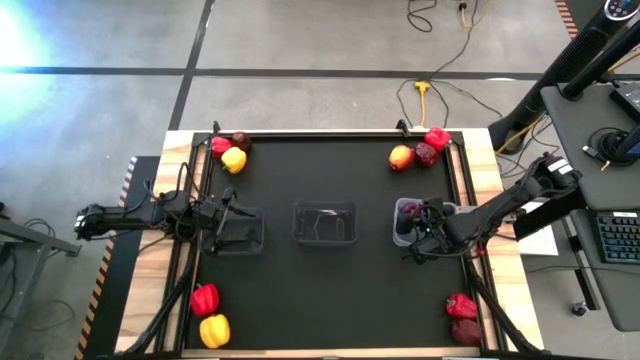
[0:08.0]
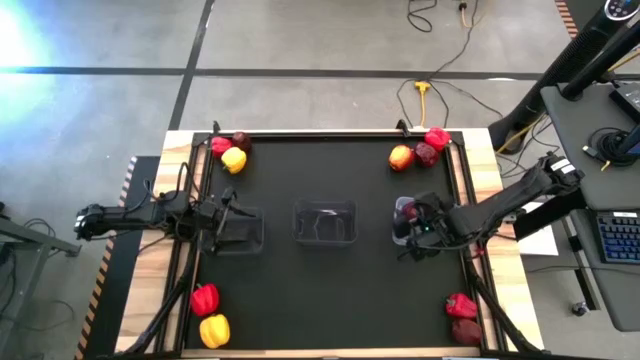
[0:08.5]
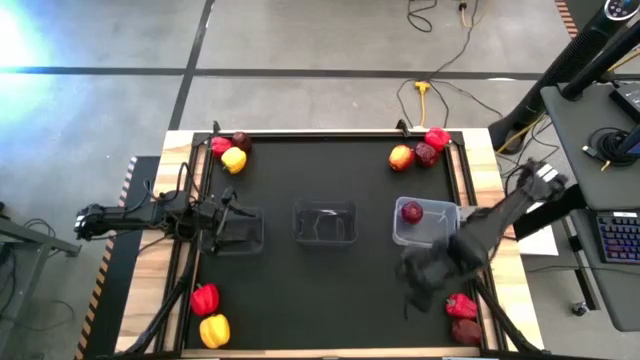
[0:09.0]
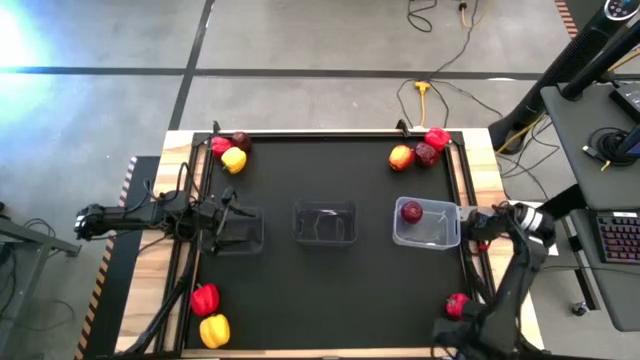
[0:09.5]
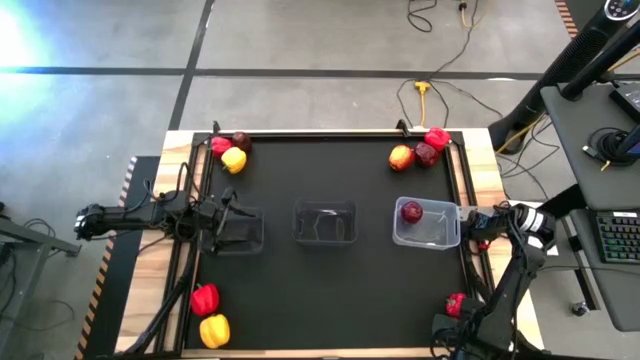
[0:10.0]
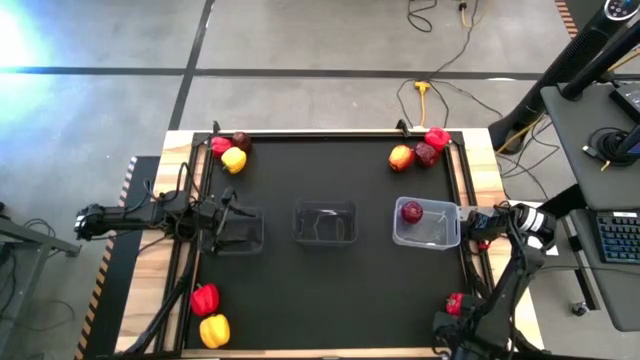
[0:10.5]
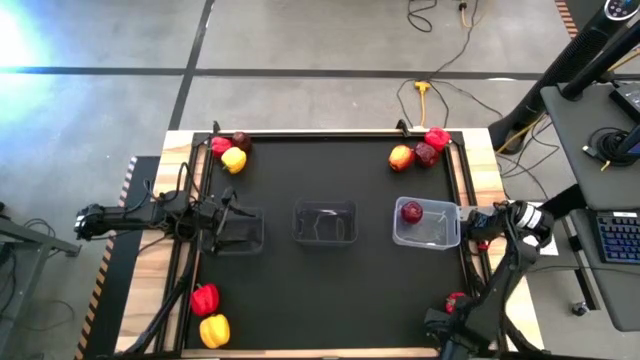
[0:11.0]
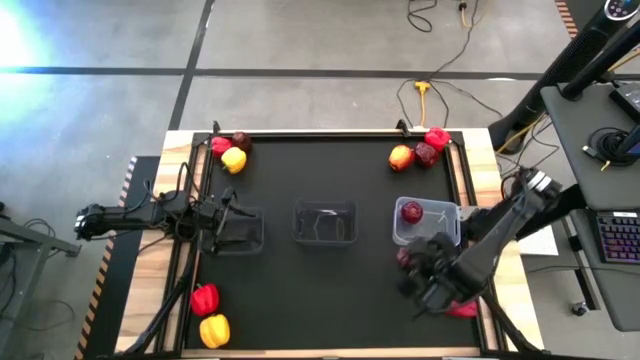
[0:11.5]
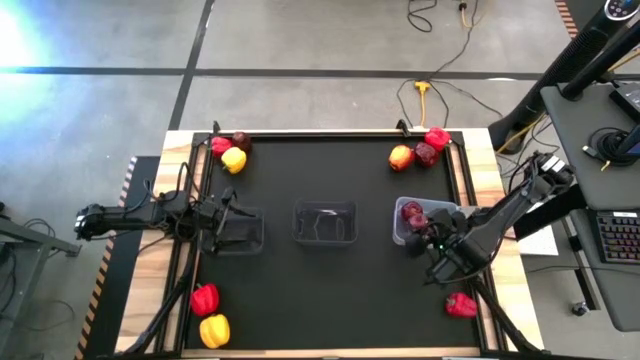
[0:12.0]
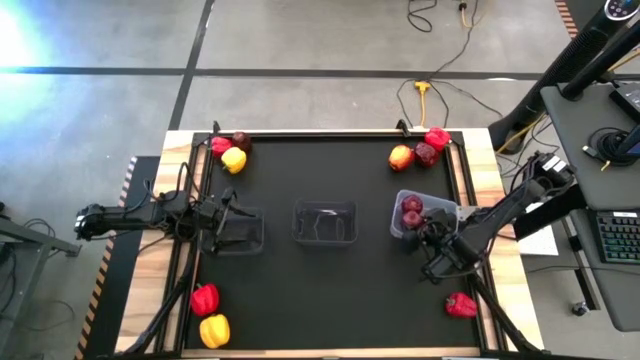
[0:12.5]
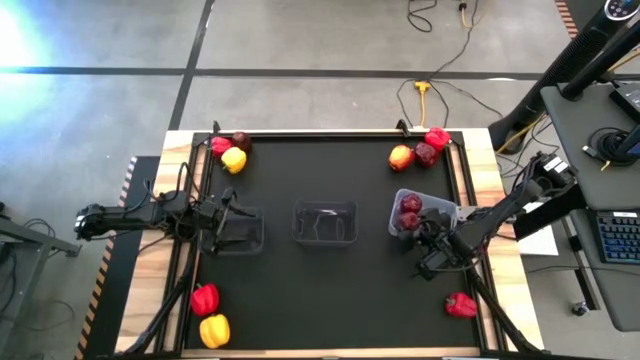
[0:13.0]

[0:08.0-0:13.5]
Task: Sort produce into baskets
Put the red apple into the transparent bin

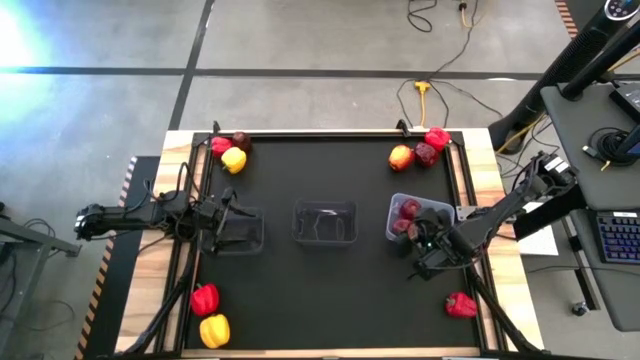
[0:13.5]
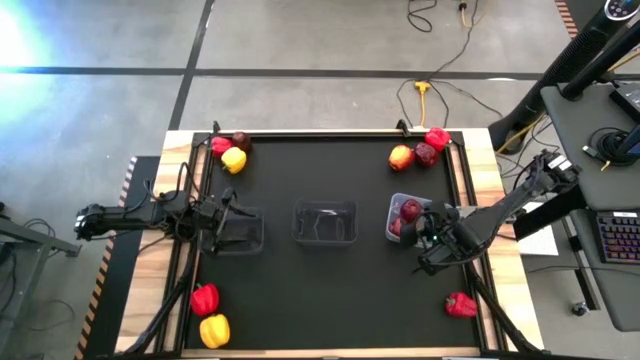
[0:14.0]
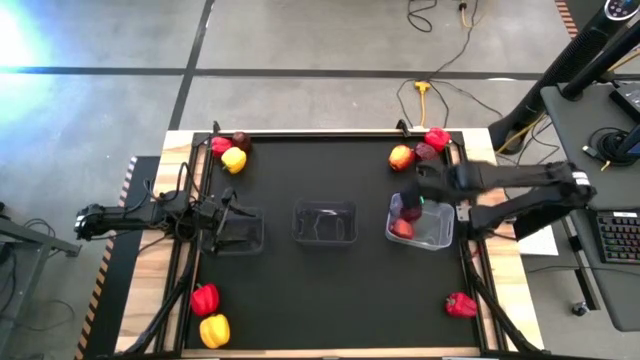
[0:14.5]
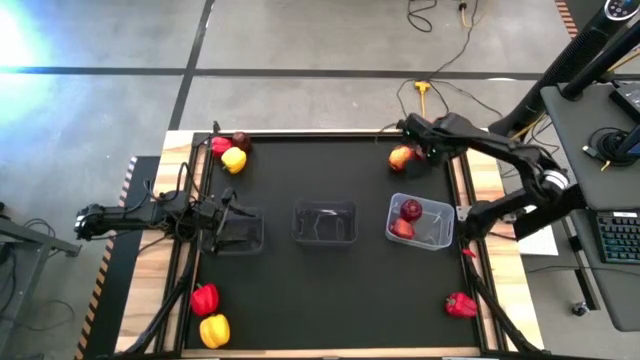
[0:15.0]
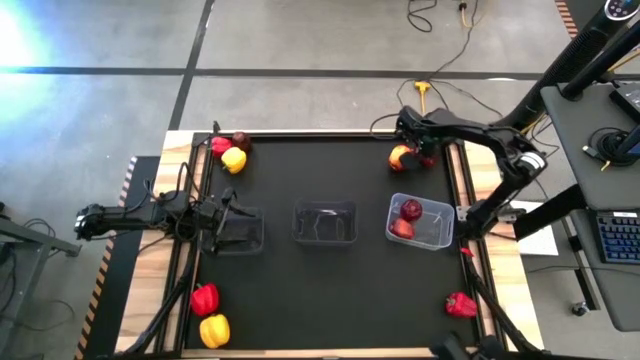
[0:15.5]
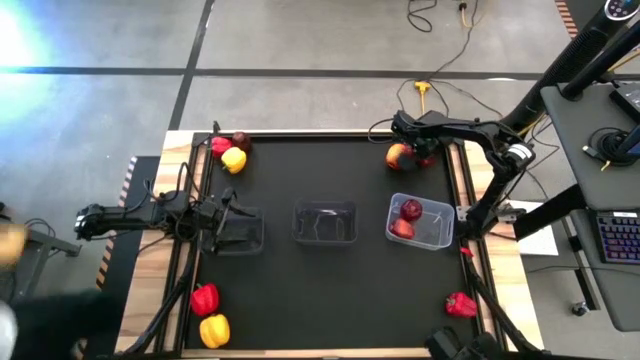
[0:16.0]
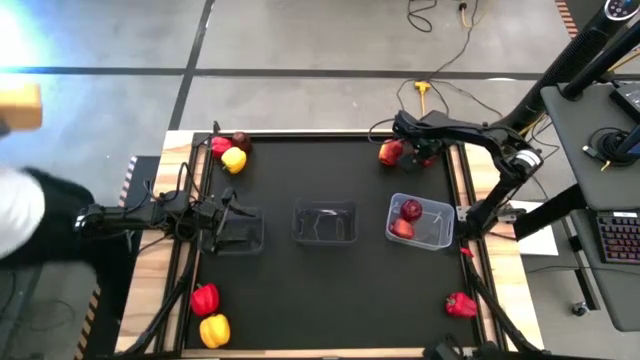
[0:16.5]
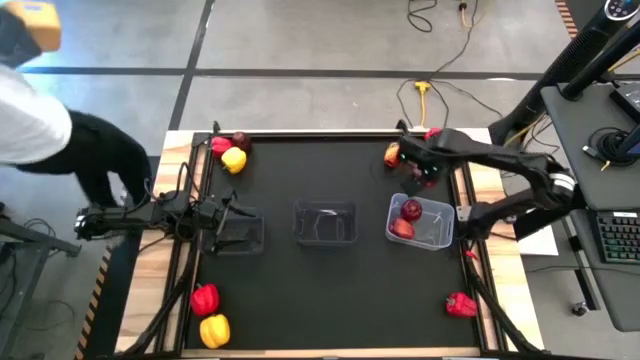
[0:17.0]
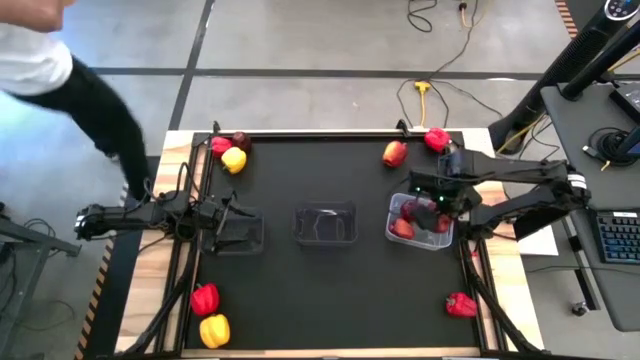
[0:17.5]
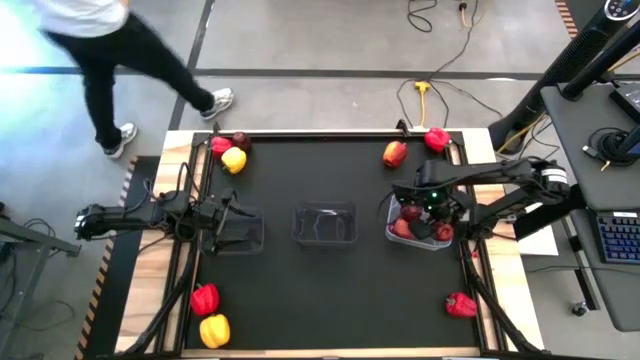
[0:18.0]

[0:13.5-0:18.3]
Put the red apple into the transparent bin

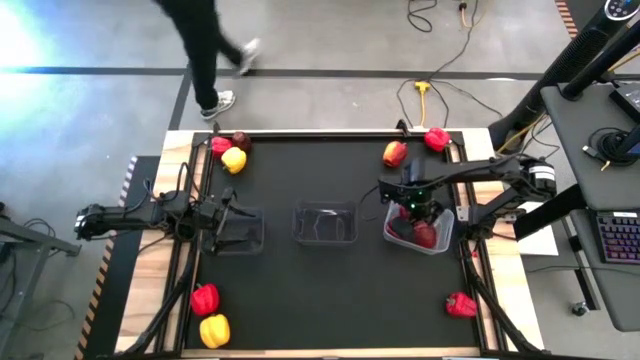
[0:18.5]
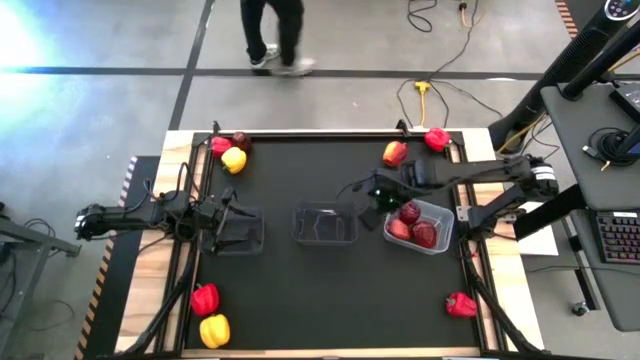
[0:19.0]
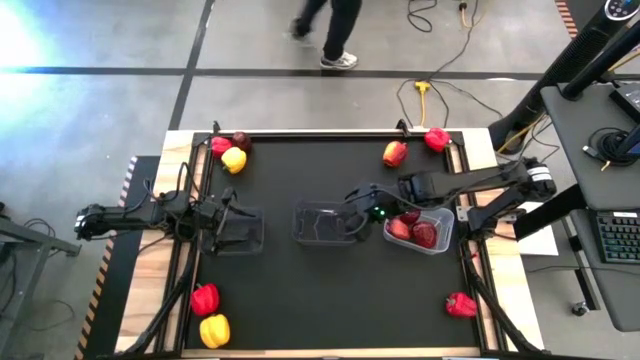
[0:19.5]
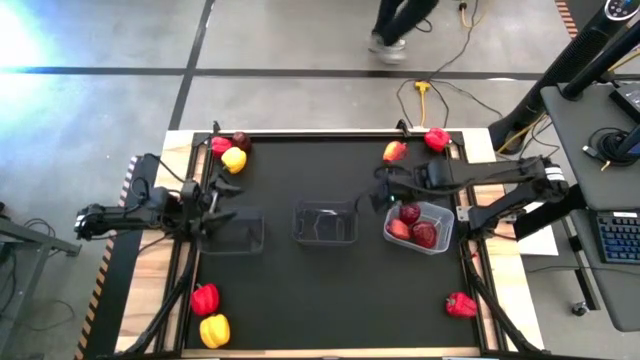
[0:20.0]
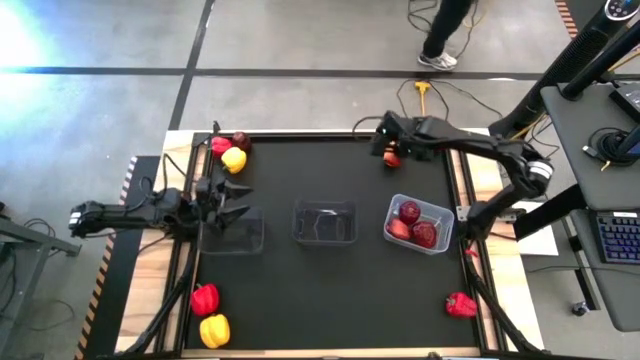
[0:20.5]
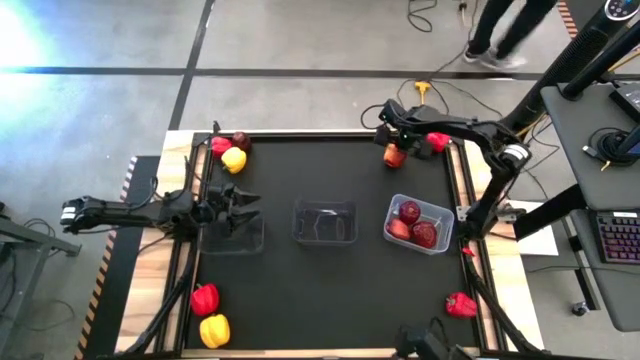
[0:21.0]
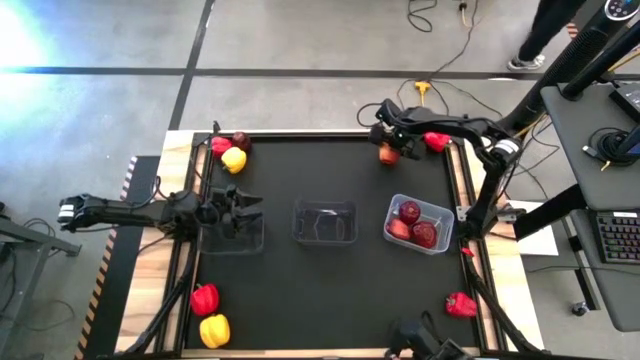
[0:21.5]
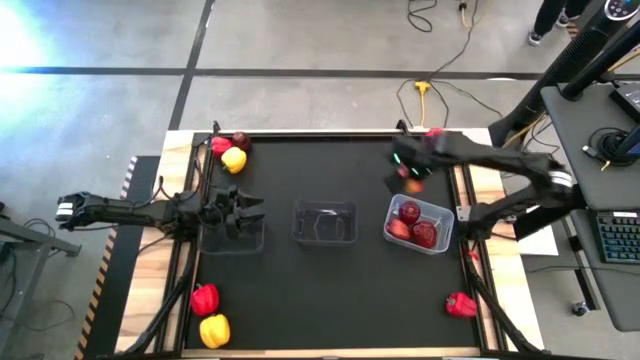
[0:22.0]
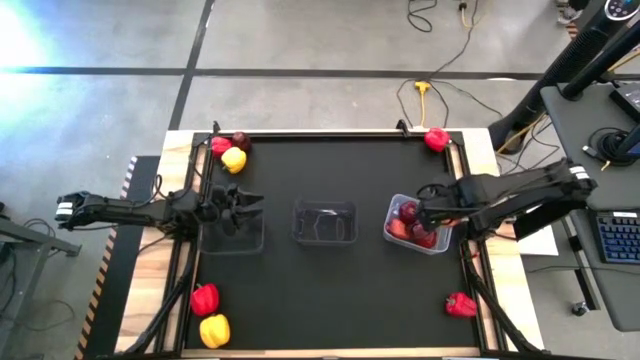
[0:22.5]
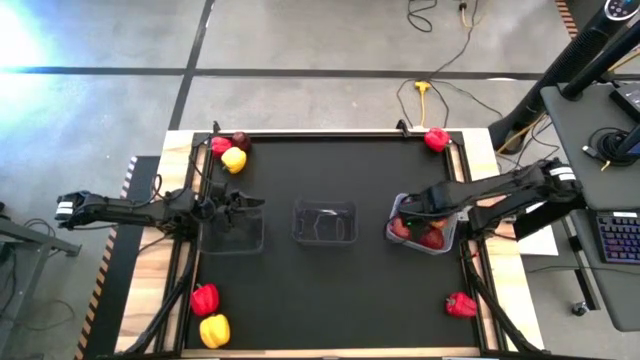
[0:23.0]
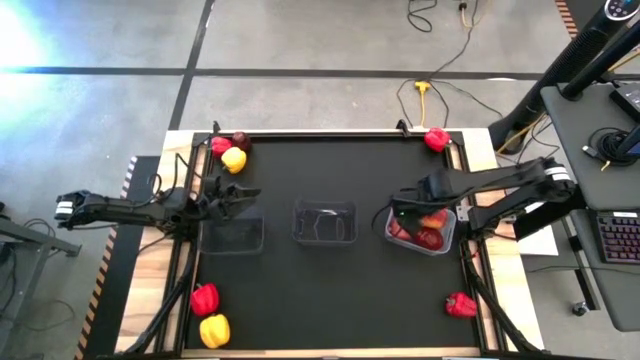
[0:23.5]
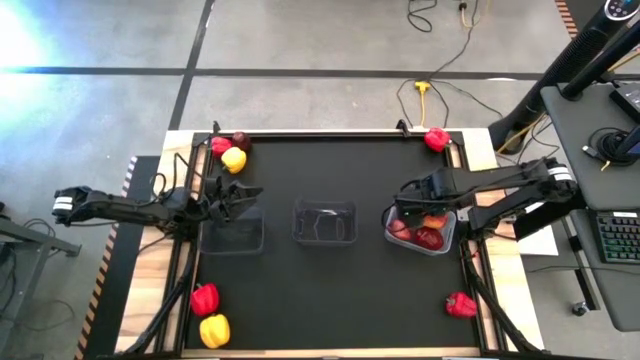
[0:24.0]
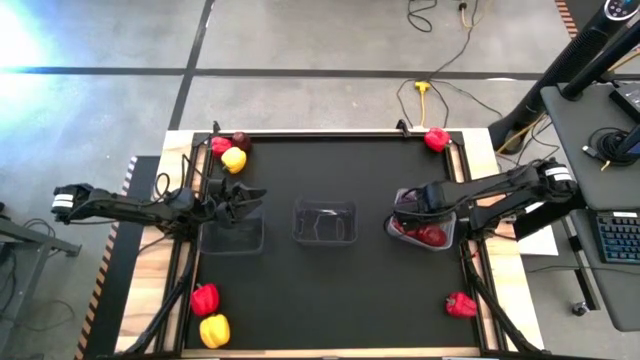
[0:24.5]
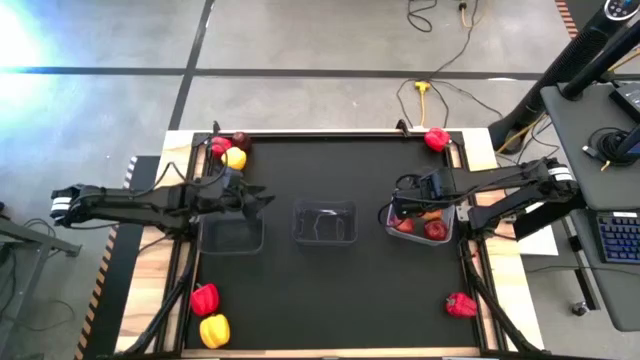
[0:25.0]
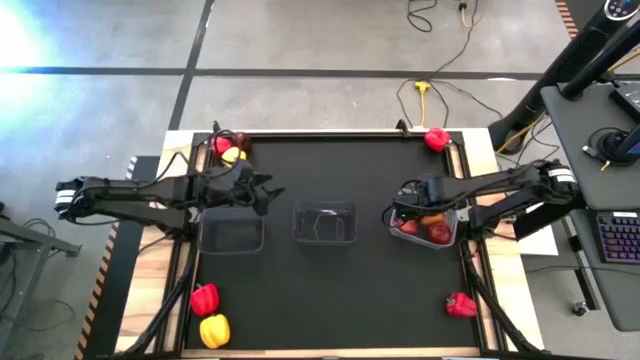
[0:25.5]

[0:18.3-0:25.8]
Put the red apple into the transparent bin

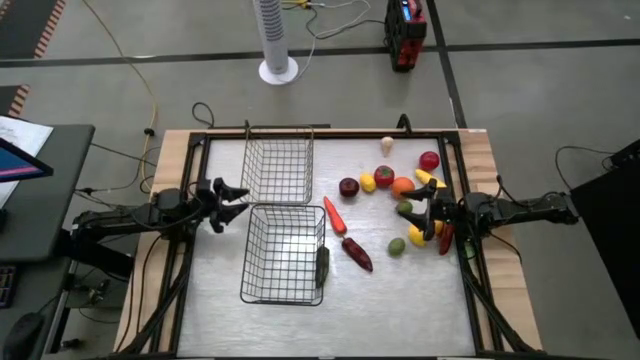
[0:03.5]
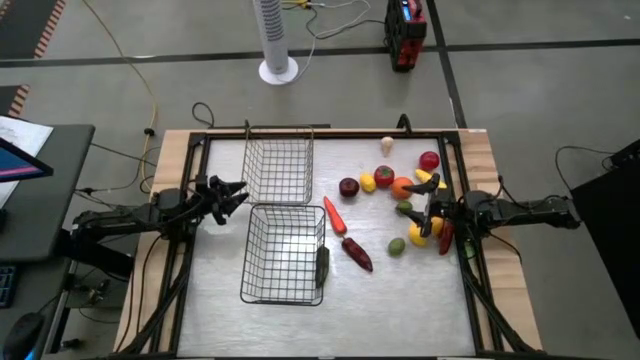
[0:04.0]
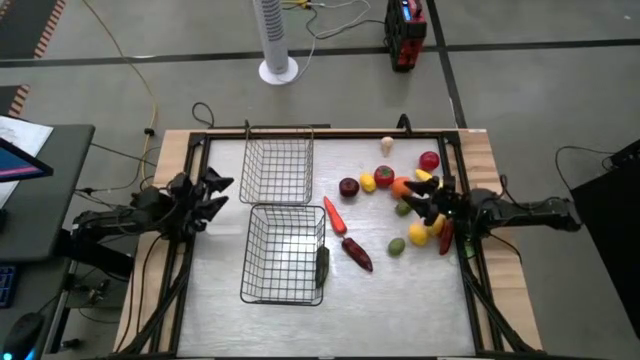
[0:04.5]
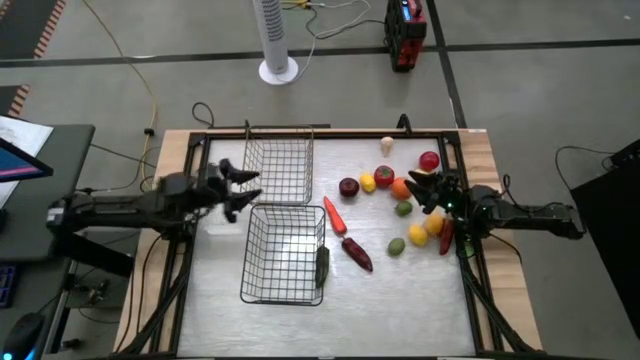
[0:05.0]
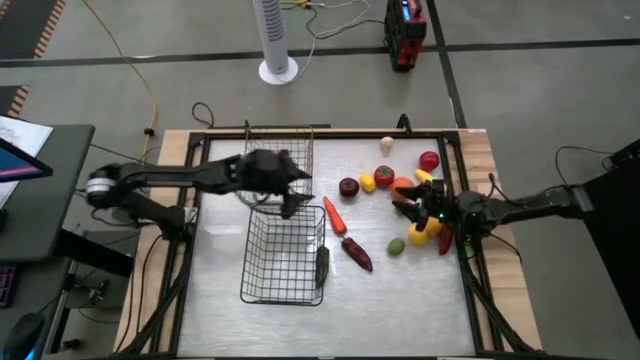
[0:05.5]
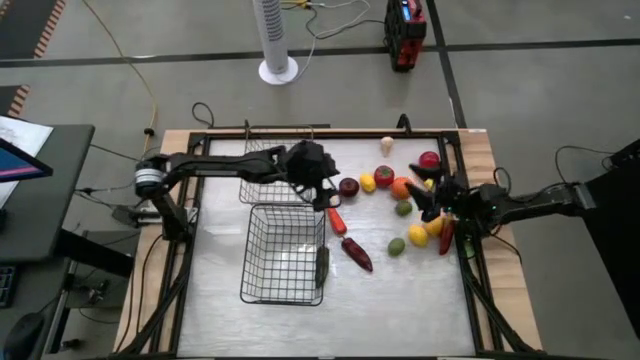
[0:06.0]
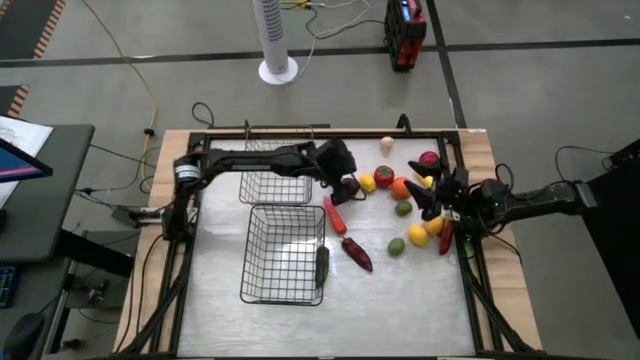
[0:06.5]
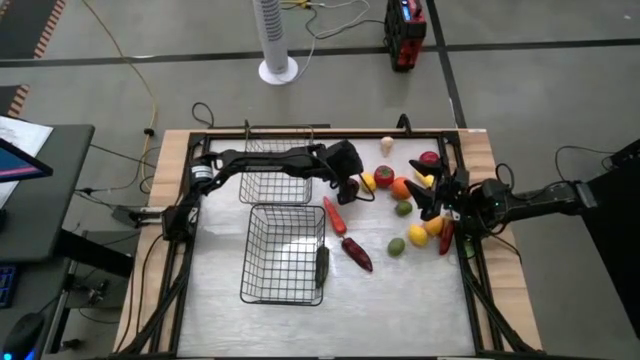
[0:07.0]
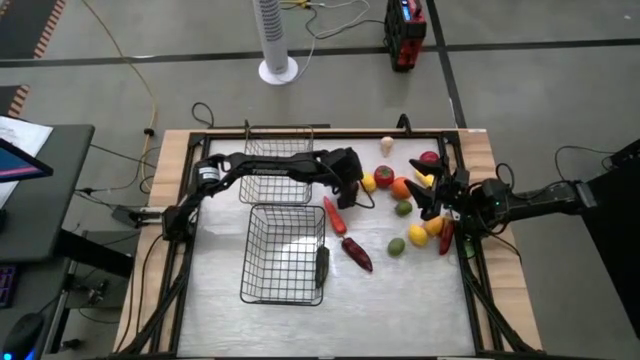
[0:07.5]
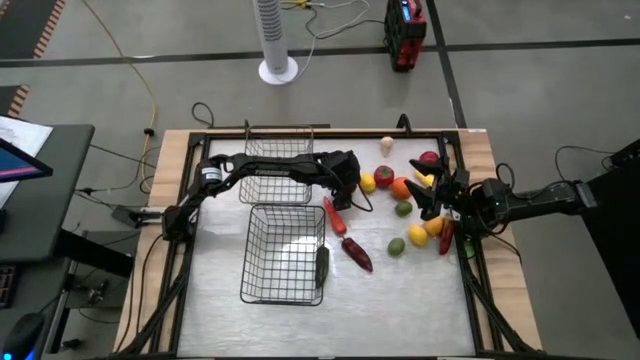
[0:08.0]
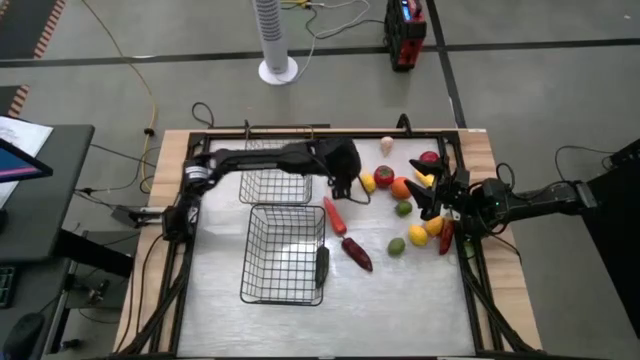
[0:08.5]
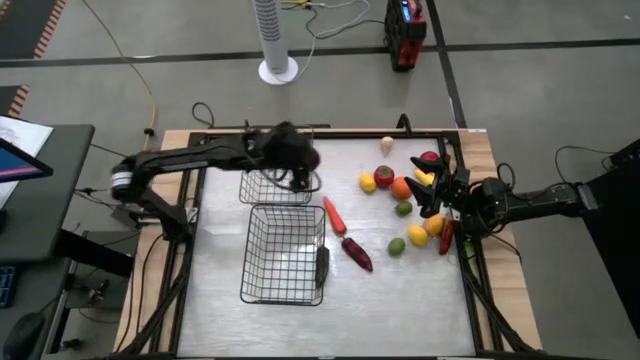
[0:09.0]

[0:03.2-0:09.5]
Task: Sort produce into baskets
Put the apple into the gold wire basket
